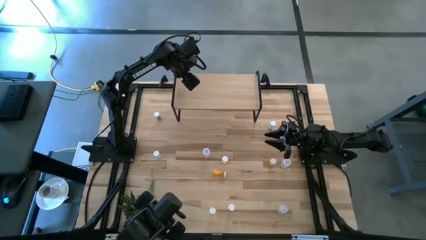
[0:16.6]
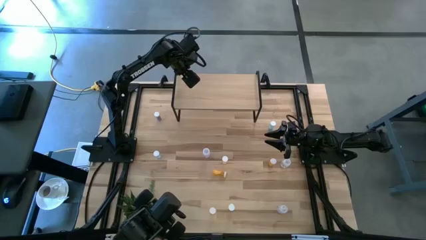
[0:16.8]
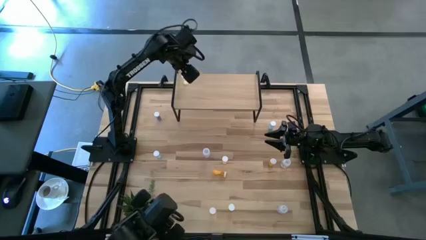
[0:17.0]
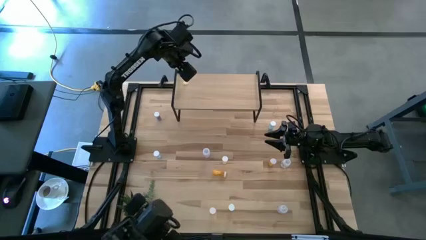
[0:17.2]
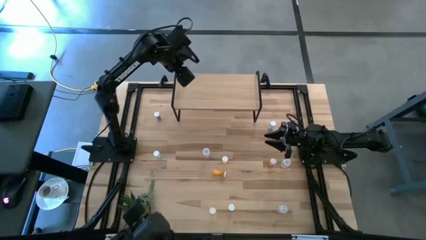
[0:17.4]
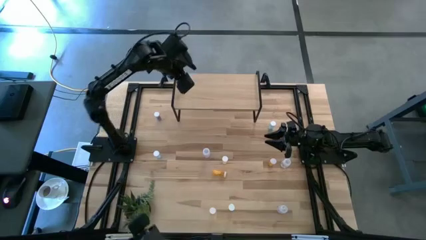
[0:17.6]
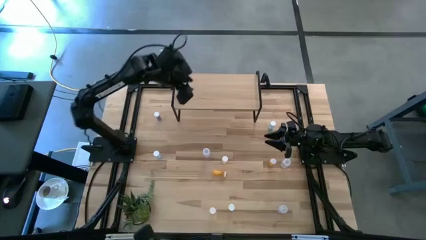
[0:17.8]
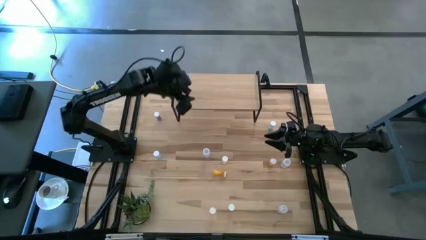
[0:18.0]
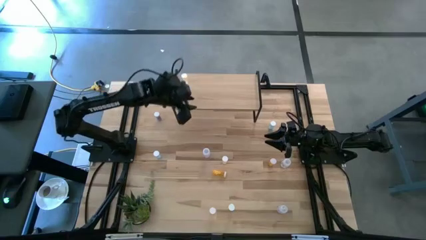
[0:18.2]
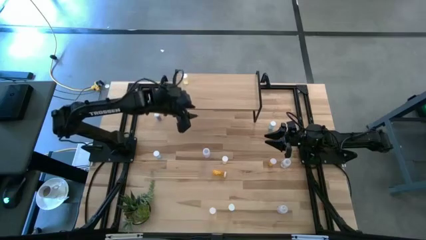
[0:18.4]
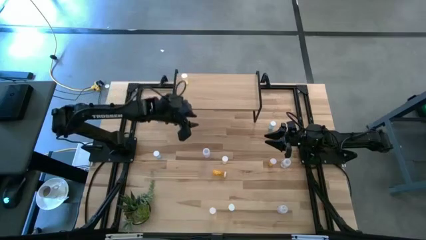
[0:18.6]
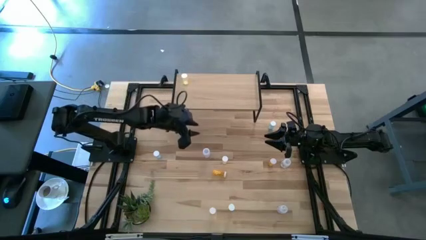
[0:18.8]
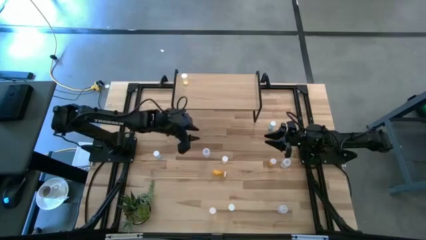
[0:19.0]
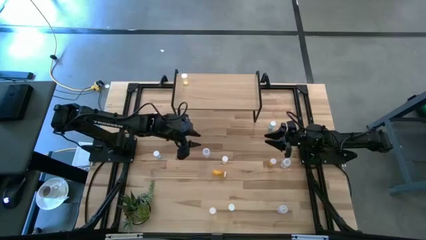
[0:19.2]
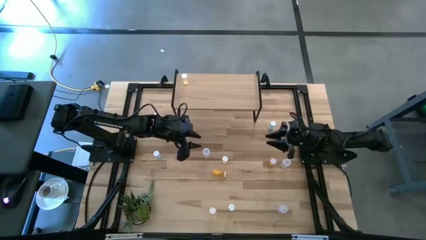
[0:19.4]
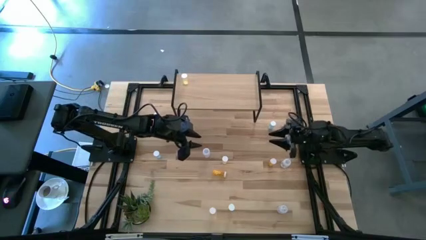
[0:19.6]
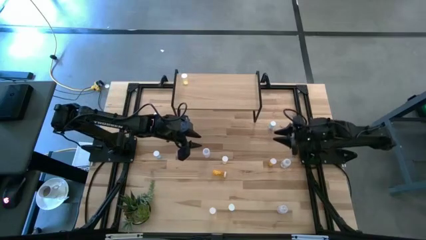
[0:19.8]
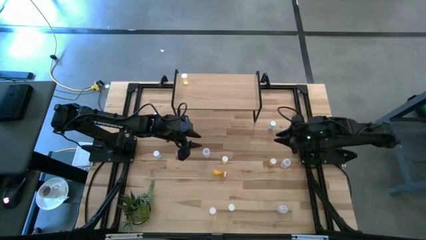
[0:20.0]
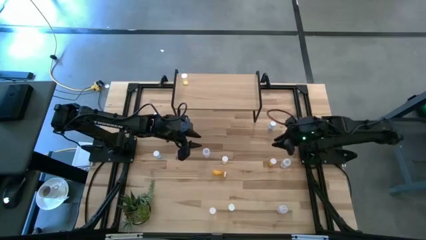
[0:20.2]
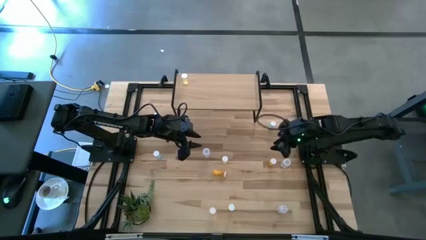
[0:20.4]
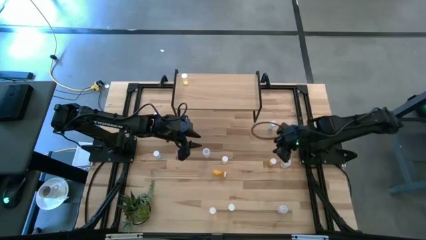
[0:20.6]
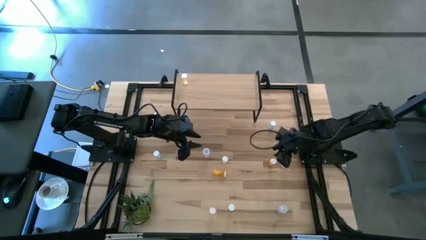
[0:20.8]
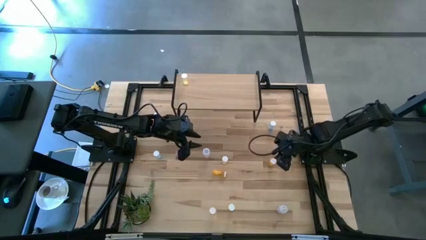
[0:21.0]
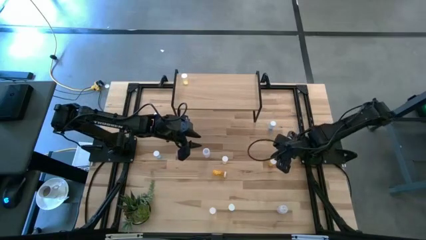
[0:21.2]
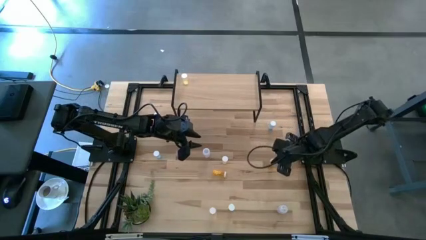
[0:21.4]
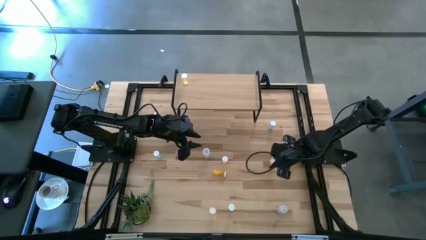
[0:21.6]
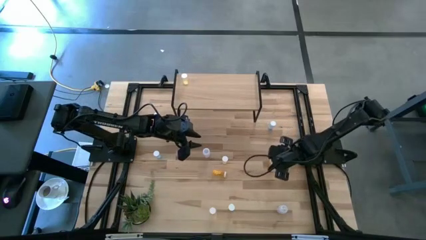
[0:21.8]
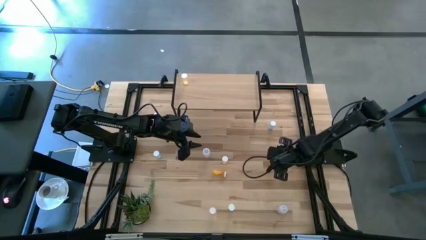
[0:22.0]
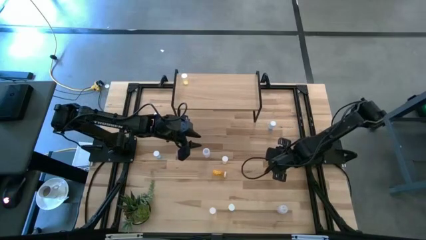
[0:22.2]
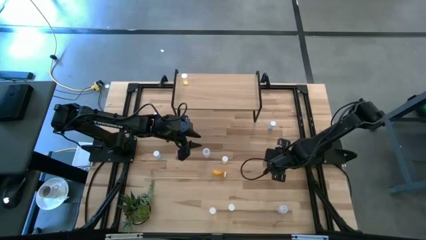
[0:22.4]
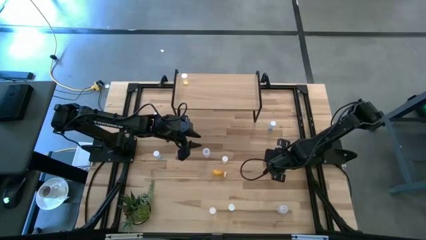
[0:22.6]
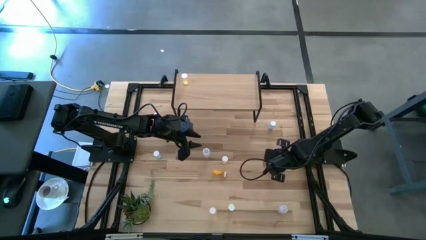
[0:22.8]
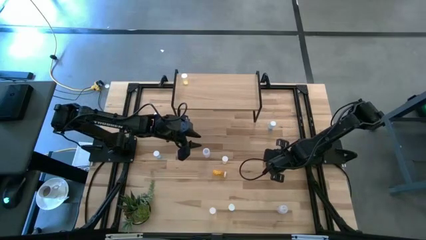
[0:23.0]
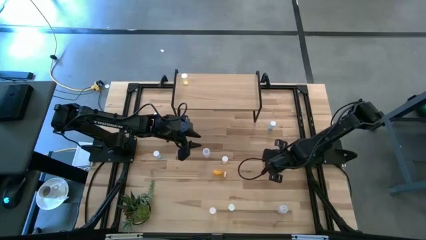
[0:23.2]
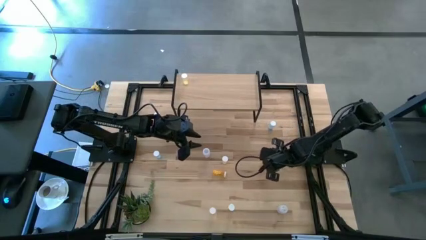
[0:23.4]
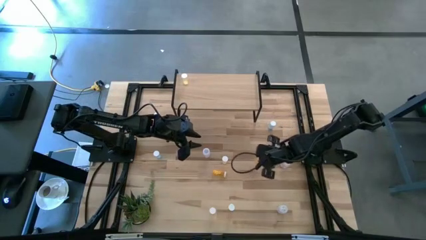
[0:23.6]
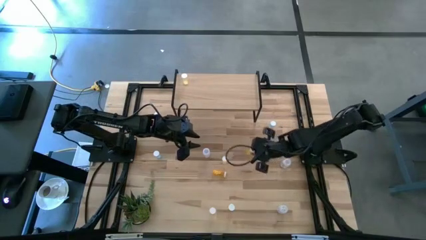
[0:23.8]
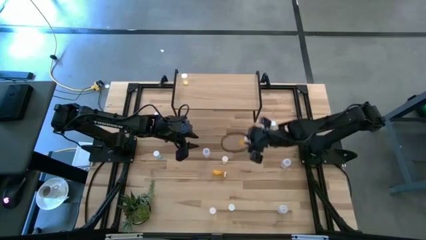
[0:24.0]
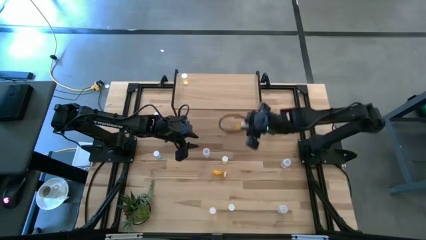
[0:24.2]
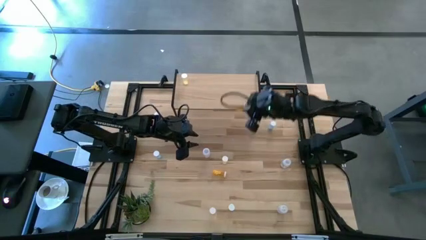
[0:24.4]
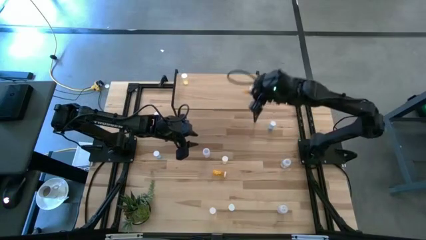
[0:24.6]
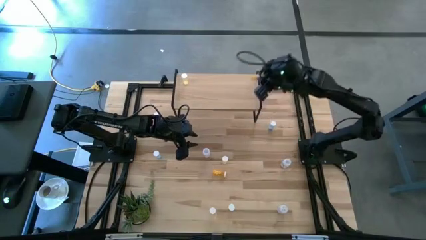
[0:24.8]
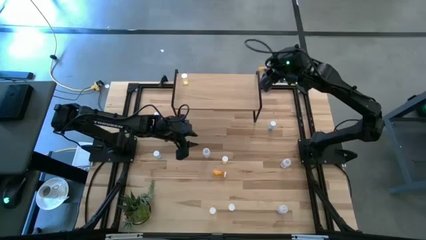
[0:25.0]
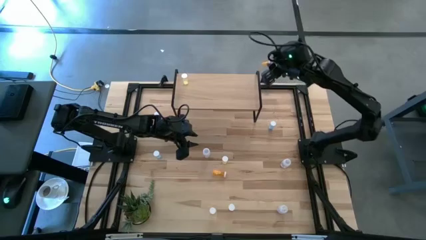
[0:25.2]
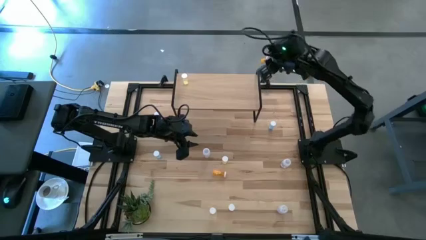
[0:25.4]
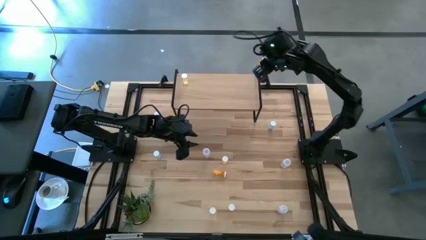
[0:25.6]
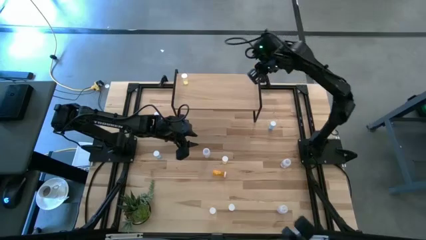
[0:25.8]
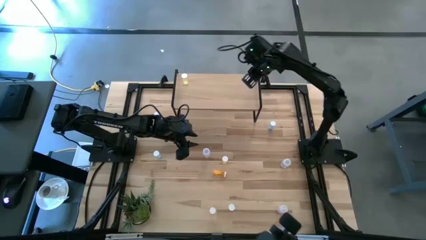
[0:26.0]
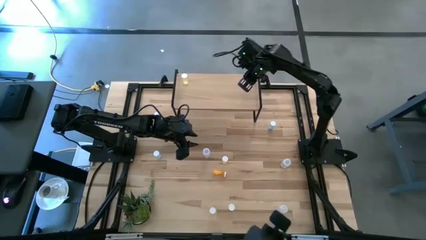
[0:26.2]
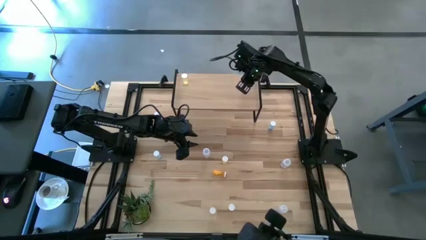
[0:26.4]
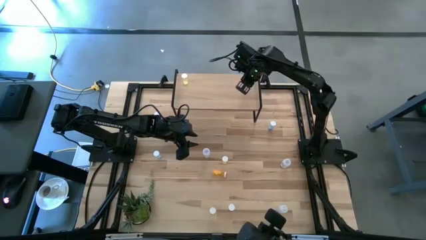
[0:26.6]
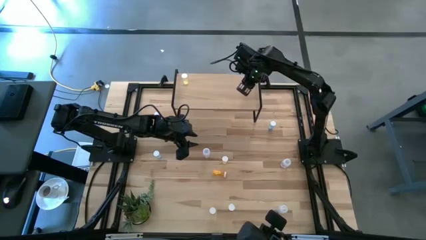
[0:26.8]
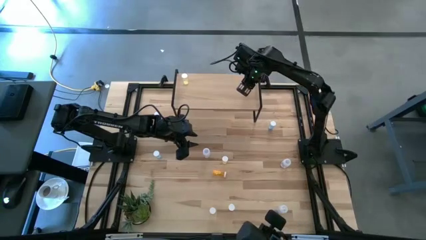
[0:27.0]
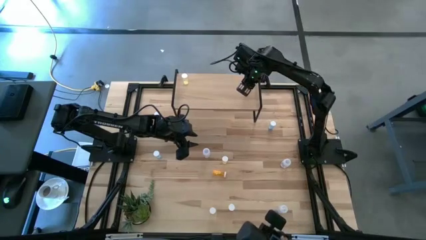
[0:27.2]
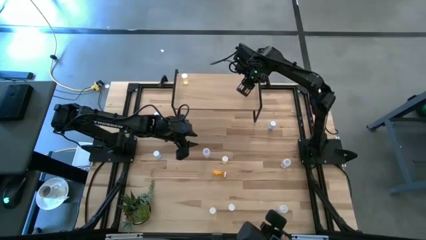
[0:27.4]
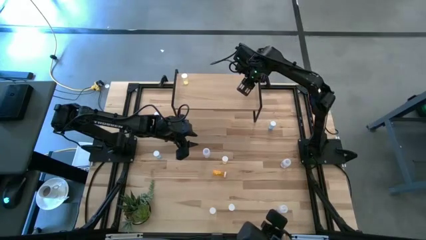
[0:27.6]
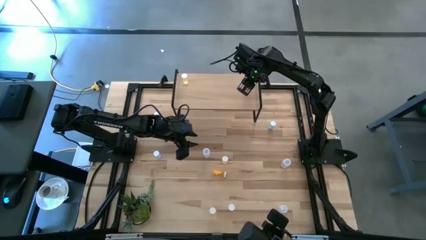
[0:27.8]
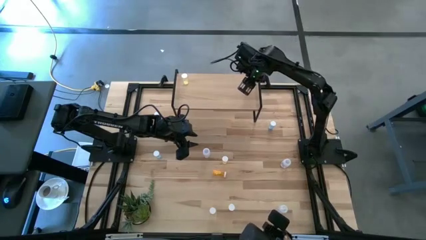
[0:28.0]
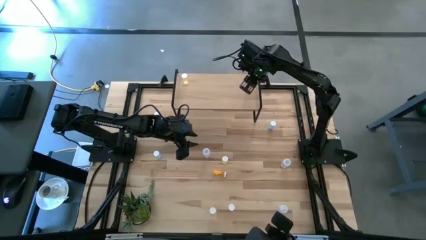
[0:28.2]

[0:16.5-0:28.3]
Task: Pick and place medicine bottles onto shelf by color
Put the top right orange pill bottle on the shelf

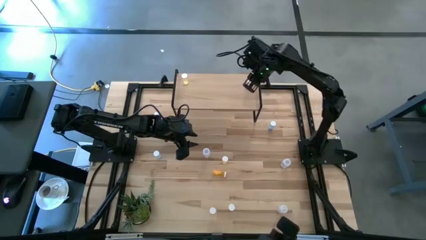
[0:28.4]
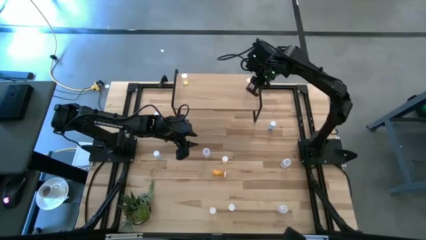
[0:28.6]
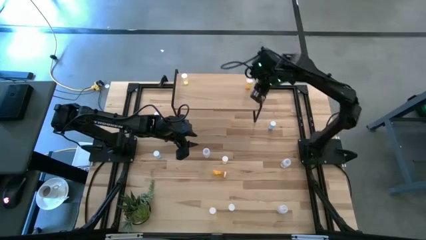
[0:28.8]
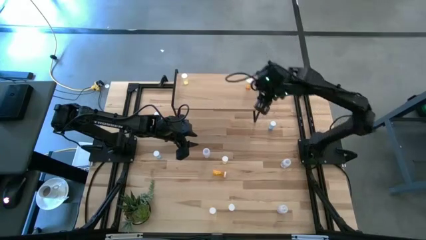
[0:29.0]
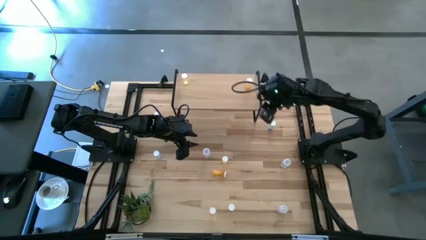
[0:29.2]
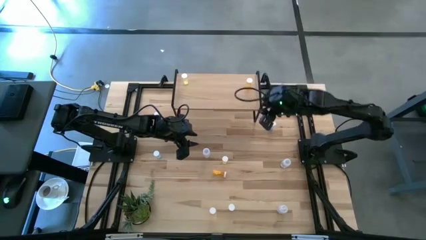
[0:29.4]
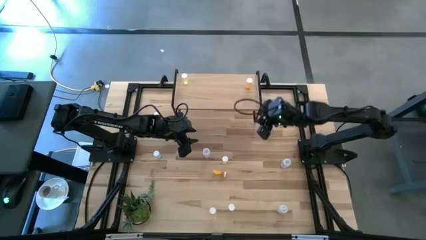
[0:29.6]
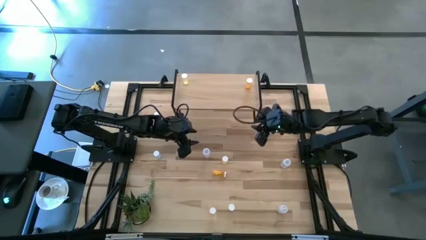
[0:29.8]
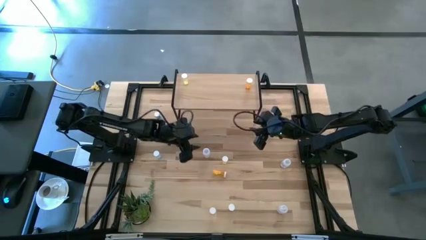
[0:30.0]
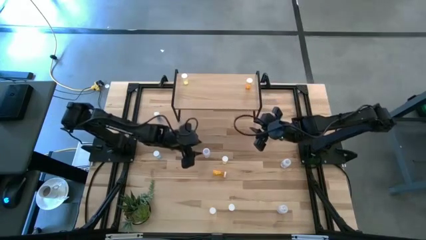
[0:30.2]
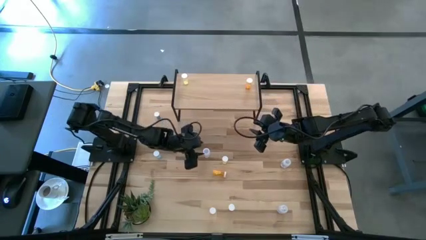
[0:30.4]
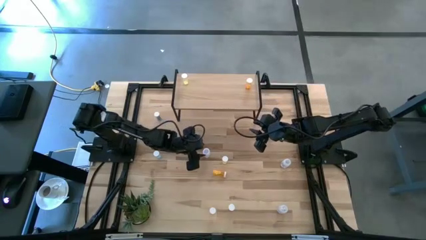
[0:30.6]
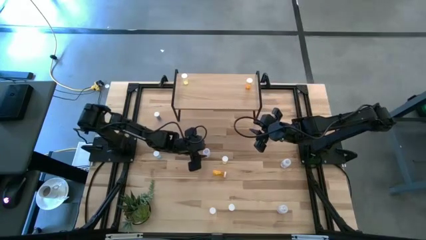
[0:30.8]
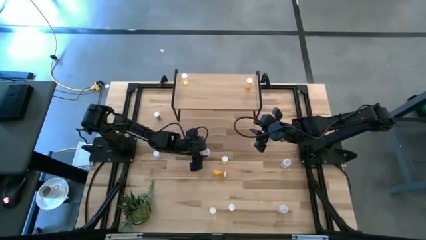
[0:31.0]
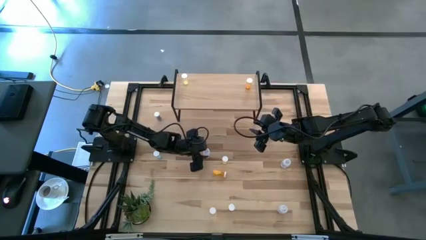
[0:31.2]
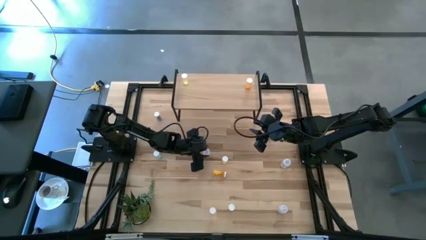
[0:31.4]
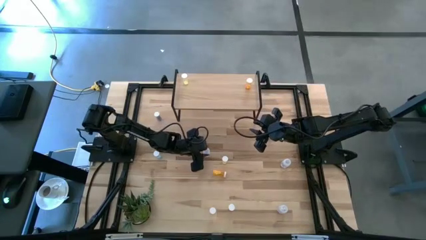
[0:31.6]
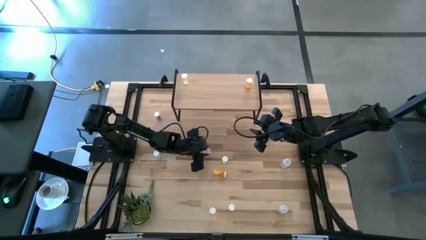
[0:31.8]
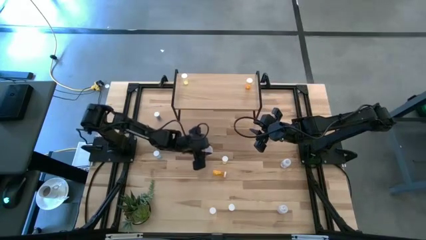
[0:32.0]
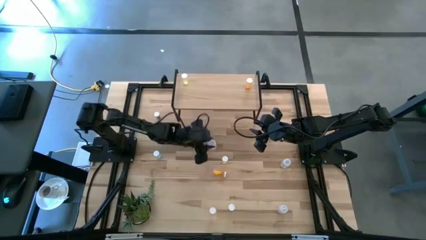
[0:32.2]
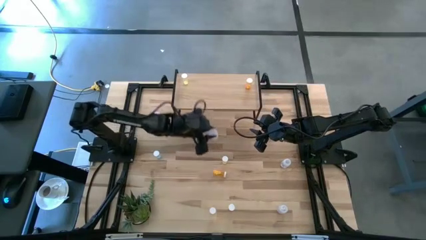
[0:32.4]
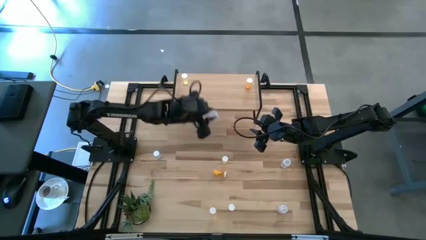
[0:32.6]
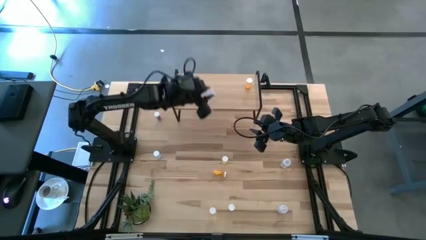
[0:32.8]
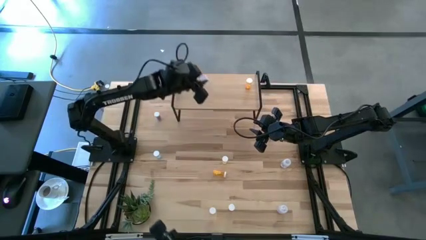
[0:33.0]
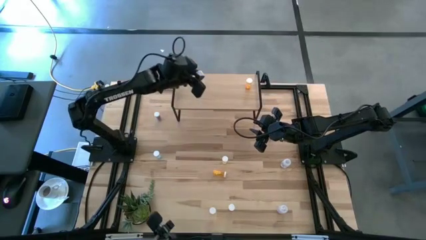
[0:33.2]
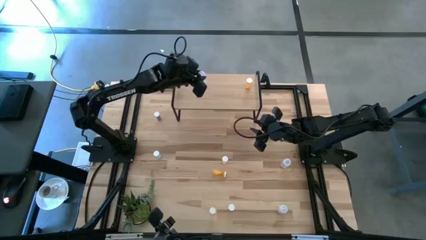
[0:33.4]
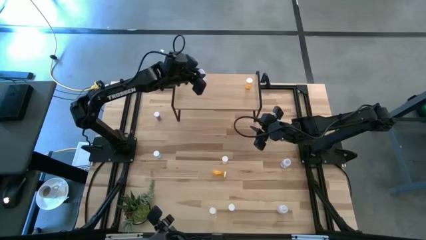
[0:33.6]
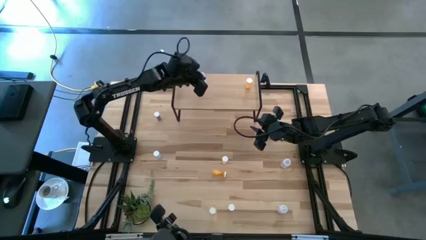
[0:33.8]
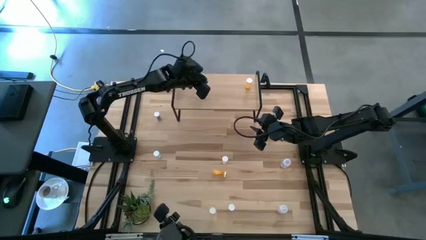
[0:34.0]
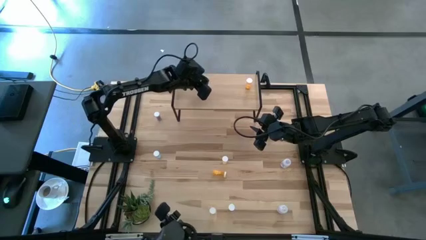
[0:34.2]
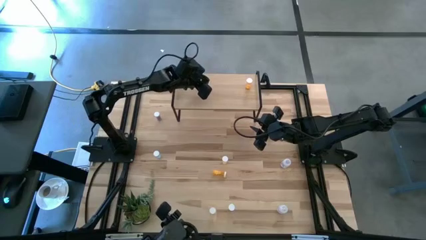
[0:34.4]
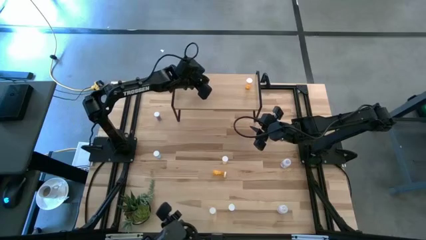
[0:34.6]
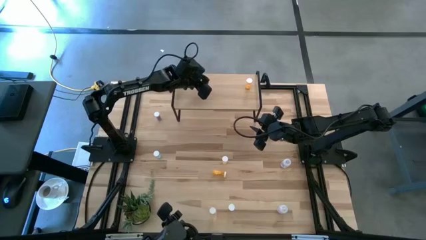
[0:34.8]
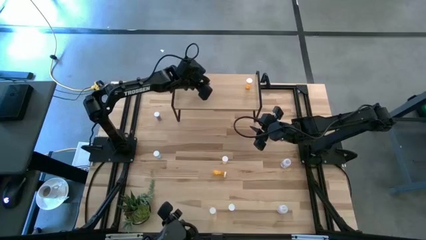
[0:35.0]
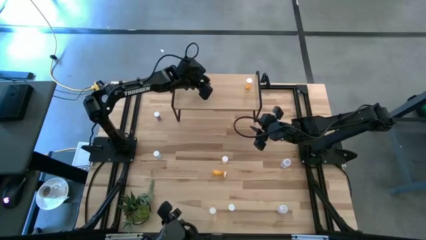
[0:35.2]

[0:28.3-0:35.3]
Put the top left transparent pill bottle on the shelf
